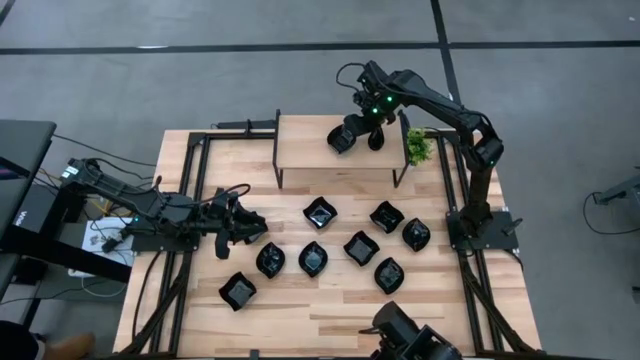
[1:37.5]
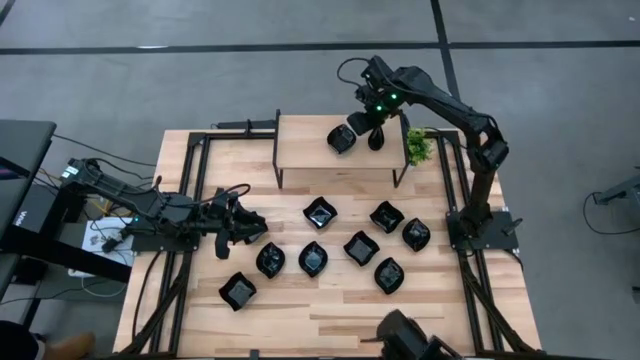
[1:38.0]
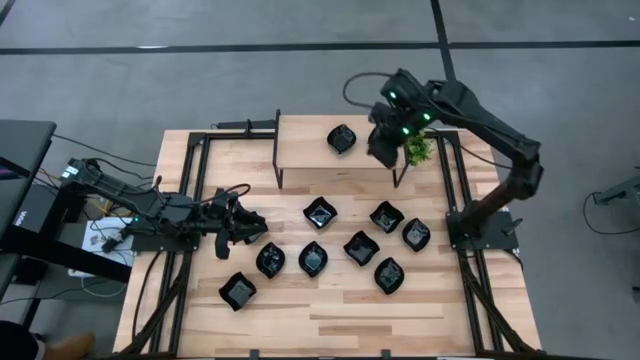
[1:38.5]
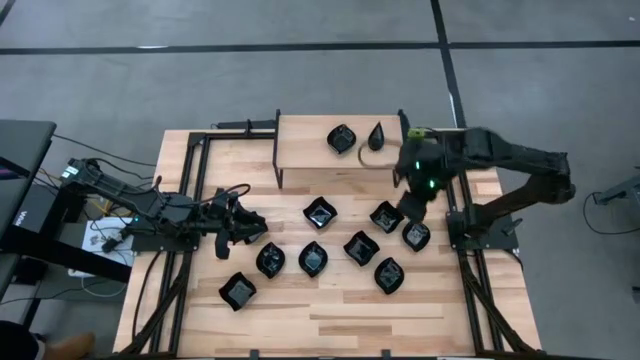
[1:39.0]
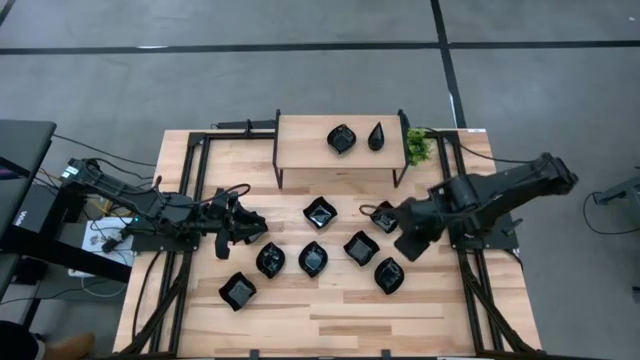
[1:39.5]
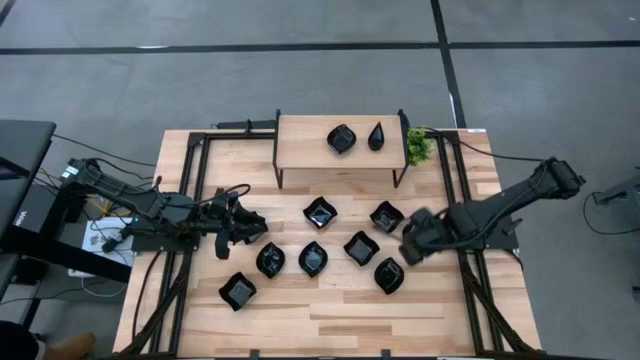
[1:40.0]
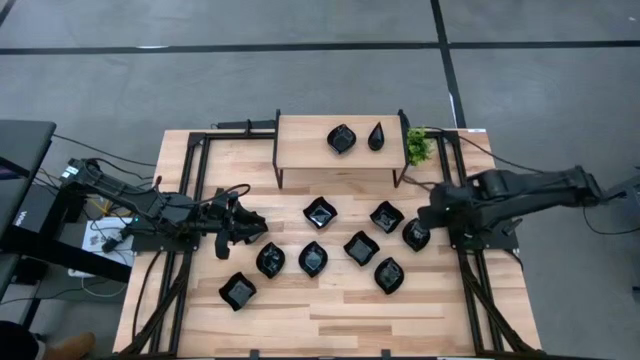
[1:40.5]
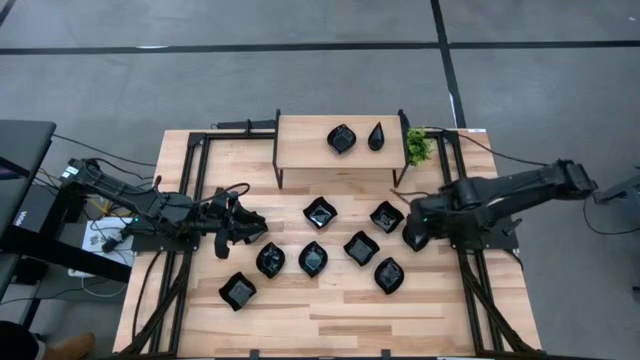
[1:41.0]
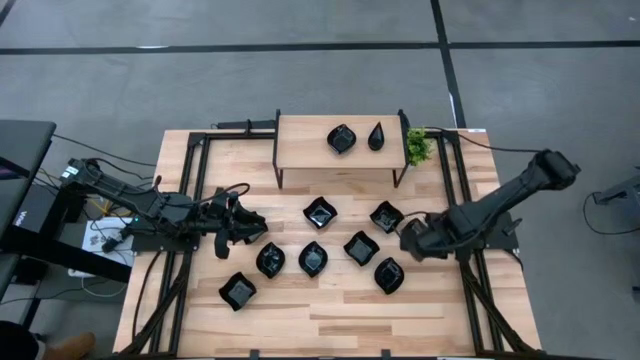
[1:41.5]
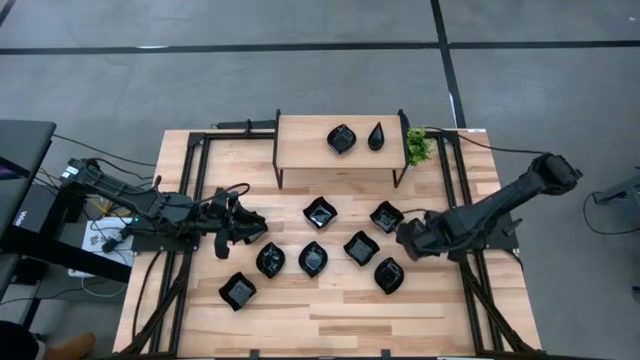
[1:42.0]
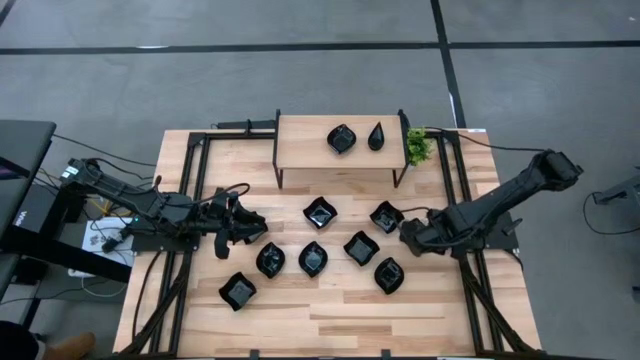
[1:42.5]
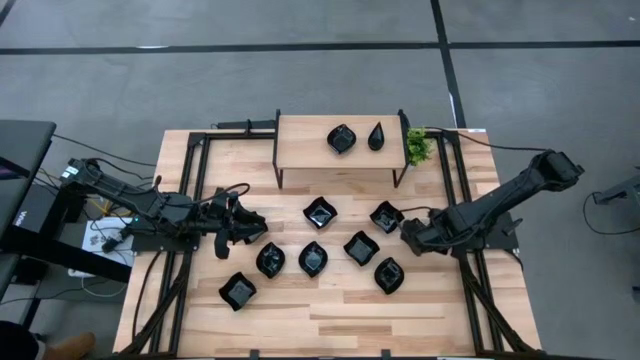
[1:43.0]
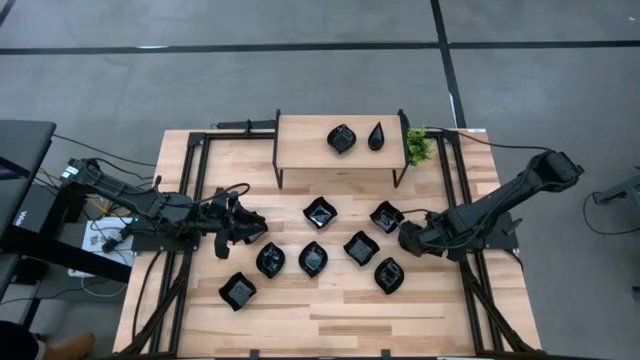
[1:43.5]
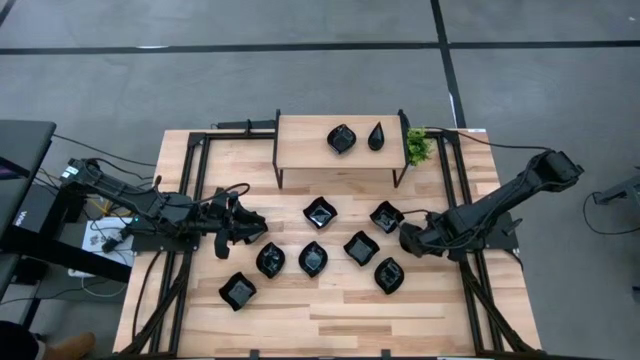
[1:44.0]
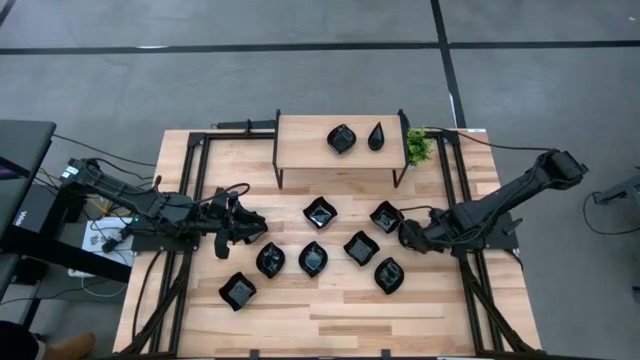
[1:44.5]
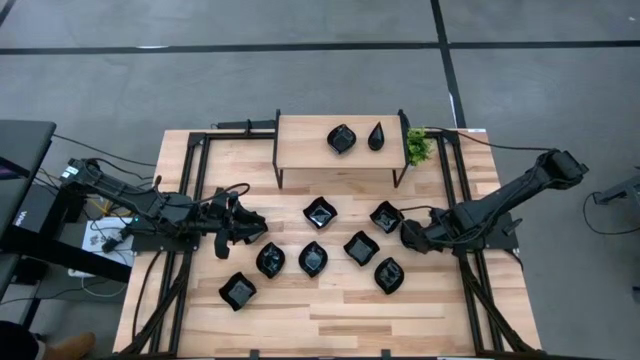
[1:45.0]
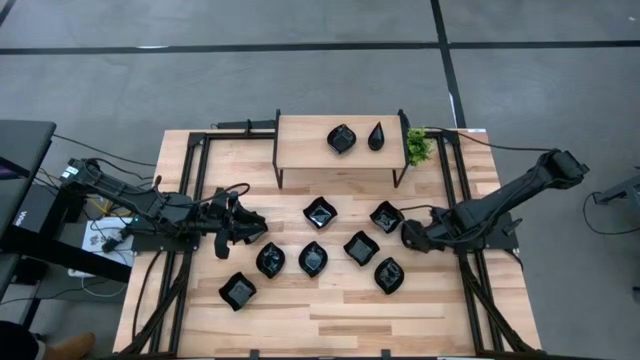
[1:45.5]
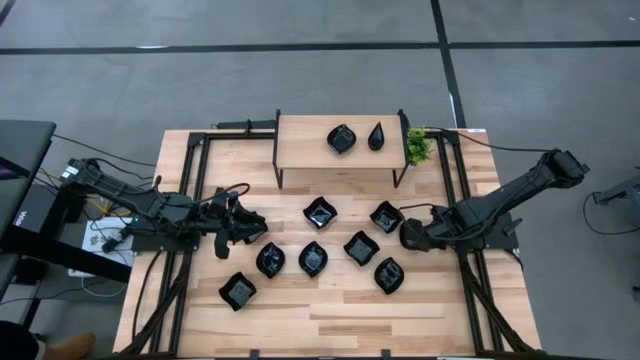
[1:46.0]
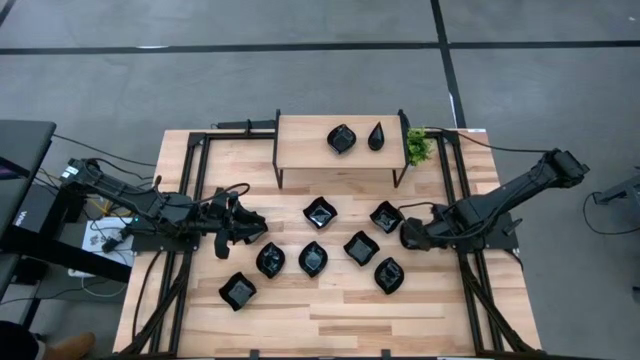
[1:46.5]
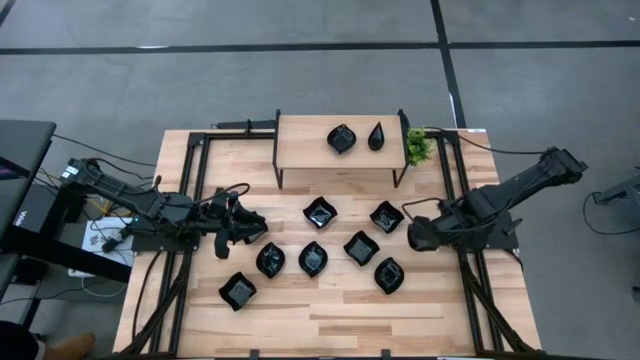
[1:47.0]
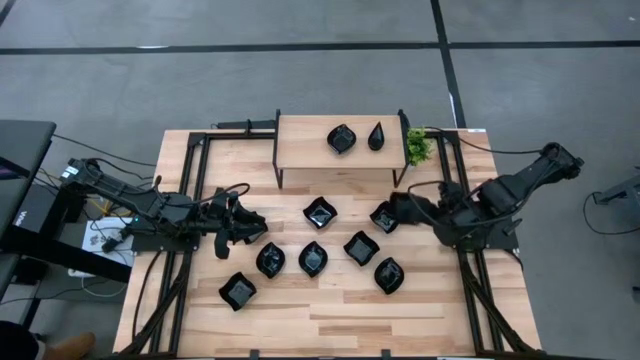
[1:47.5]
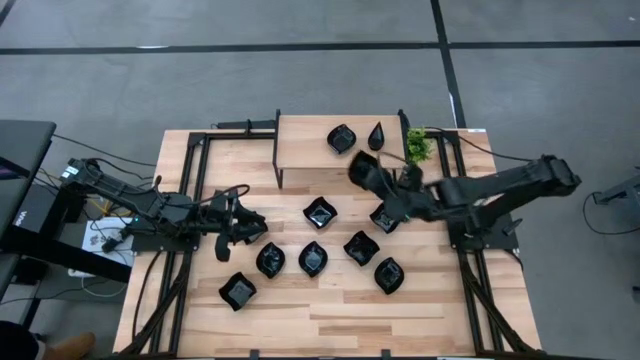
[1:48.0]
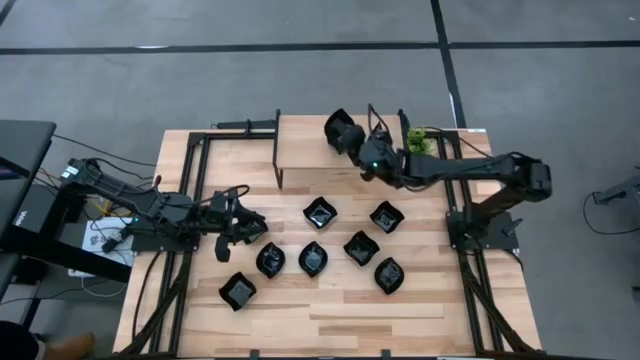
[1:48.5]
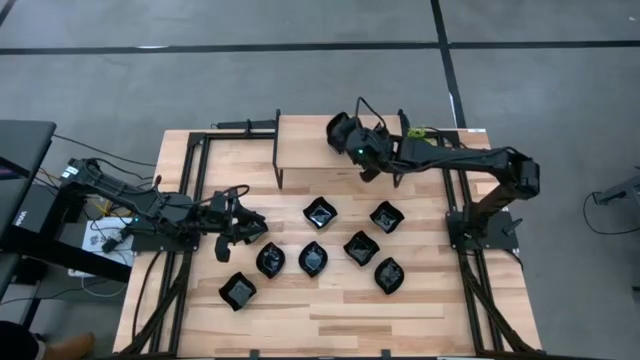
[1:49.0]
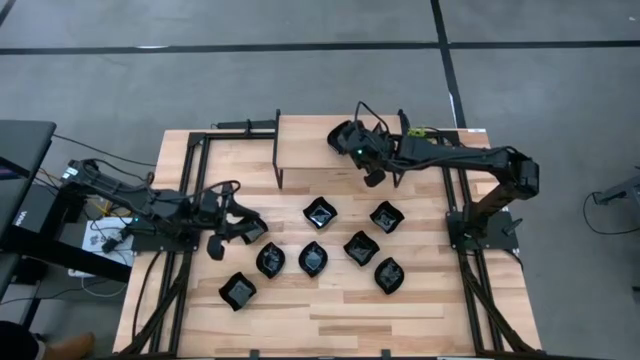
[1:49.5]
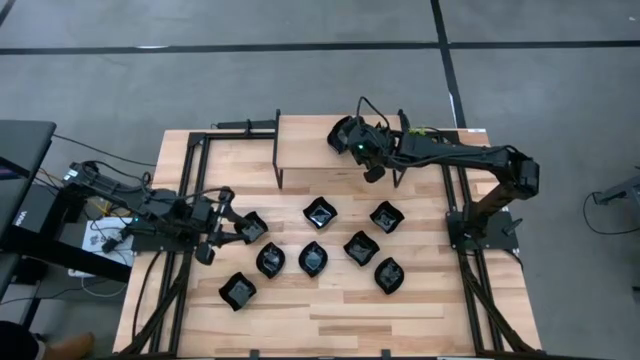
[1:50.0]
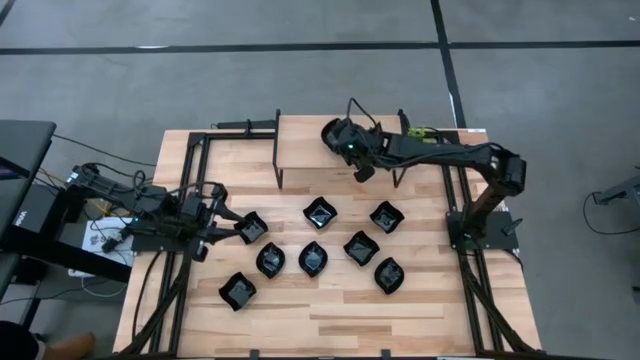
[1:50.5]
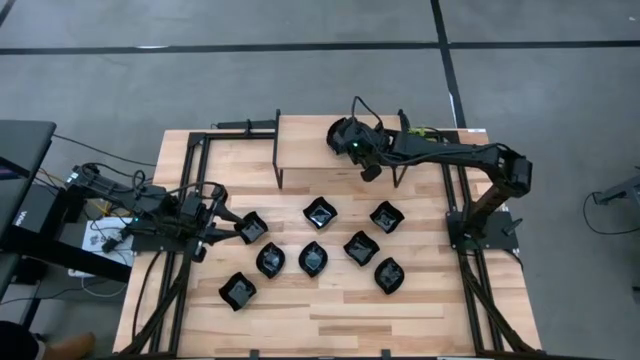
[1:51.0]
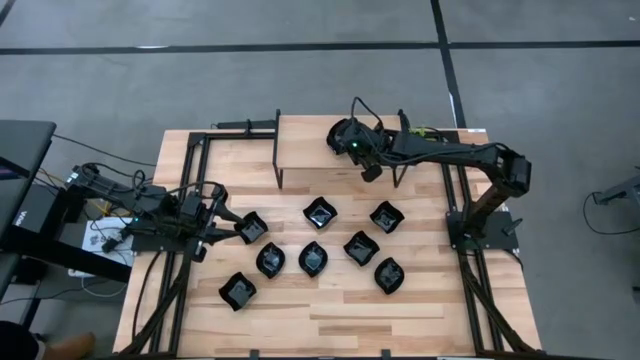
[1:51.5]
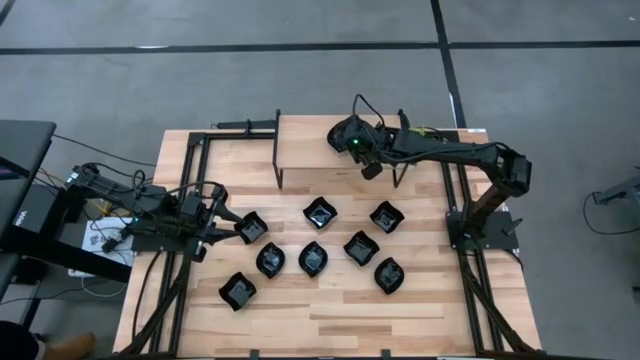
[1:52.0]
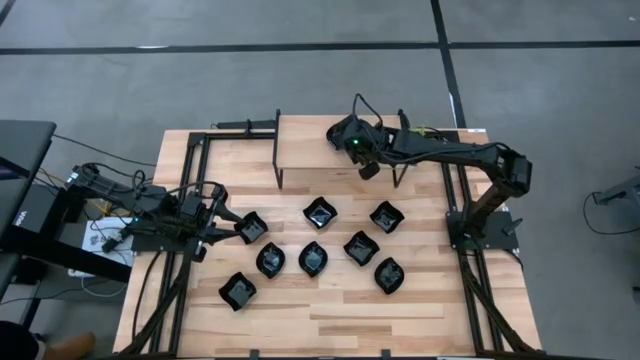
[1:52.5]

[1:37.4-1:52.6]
Task: Pick & Place Mini shaped plates
Stack the leaf-shaped plate on top of the other leaf-shaped plate on the shelf

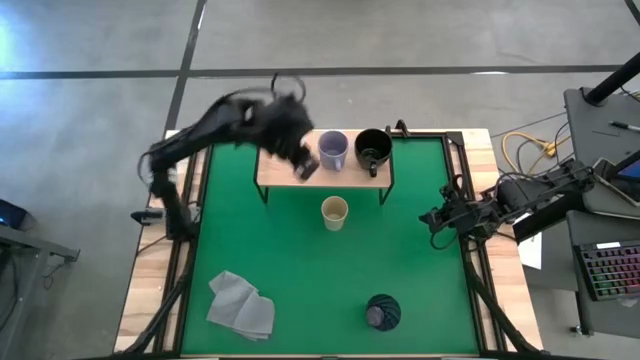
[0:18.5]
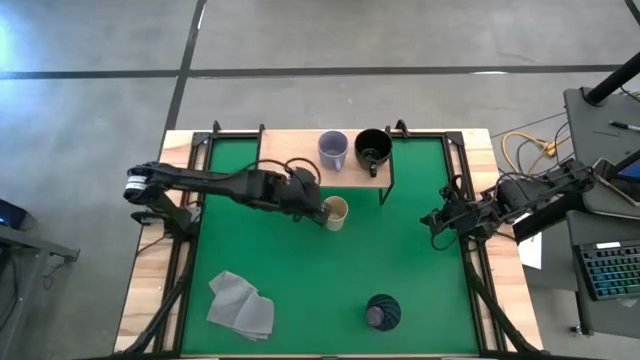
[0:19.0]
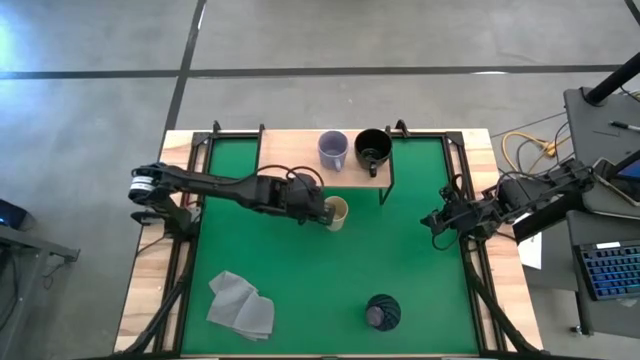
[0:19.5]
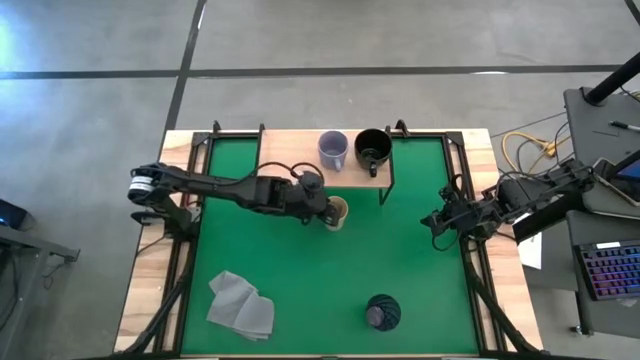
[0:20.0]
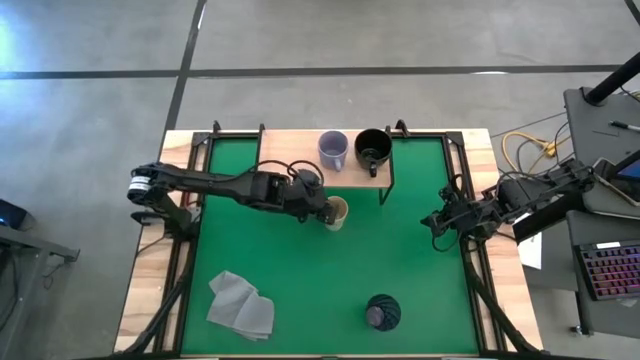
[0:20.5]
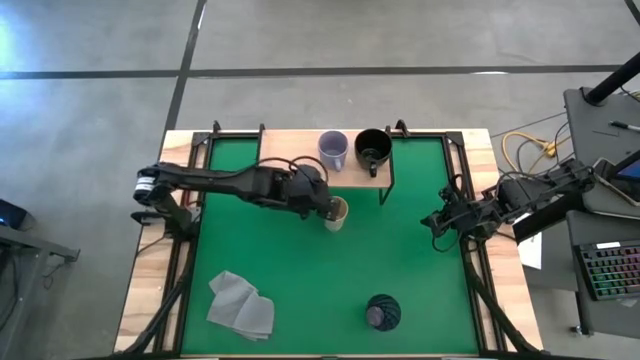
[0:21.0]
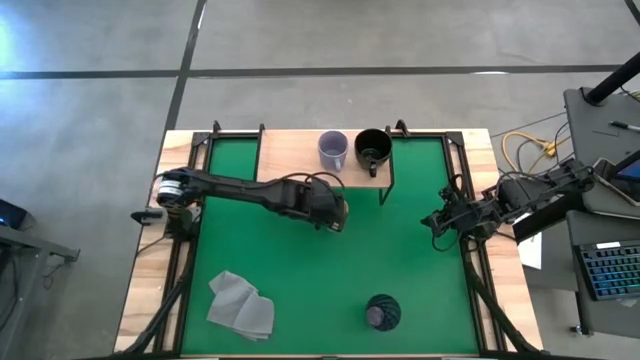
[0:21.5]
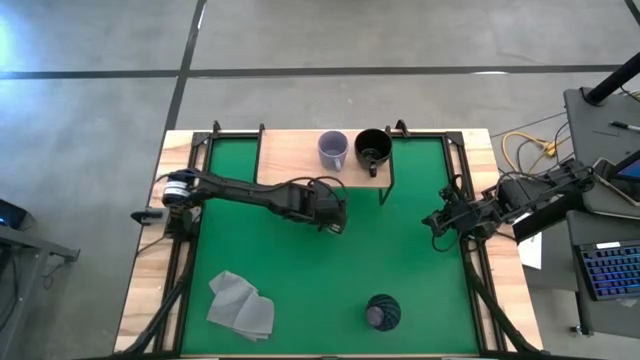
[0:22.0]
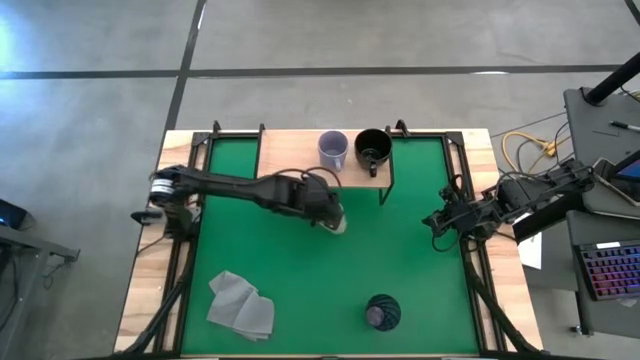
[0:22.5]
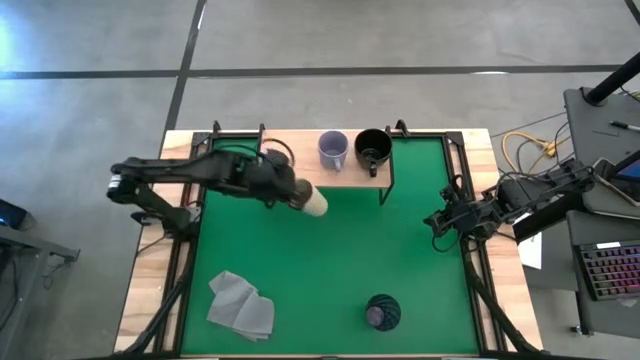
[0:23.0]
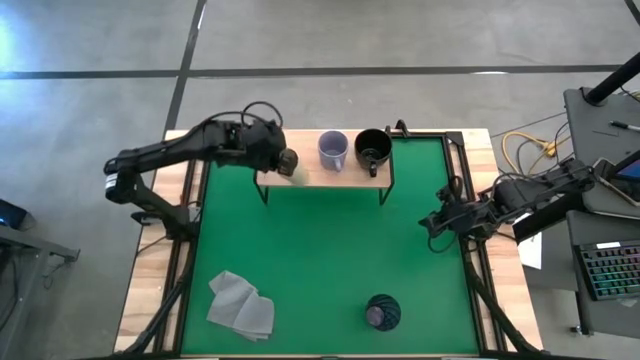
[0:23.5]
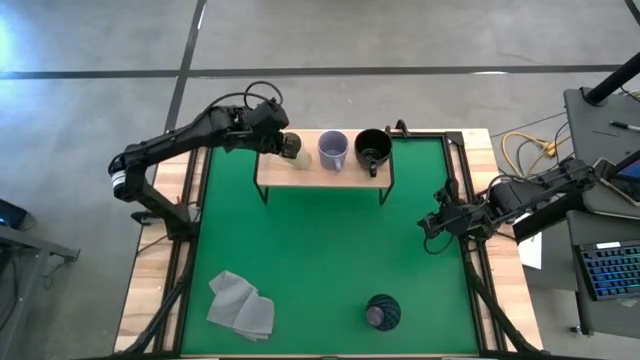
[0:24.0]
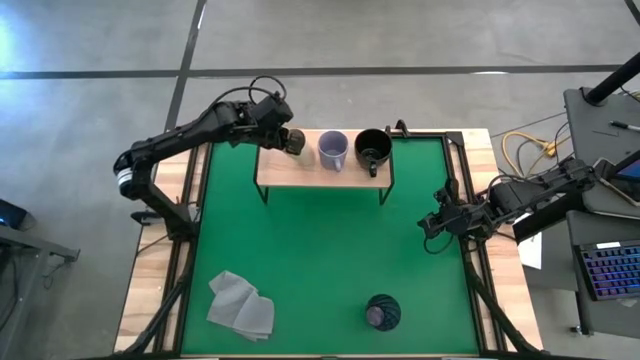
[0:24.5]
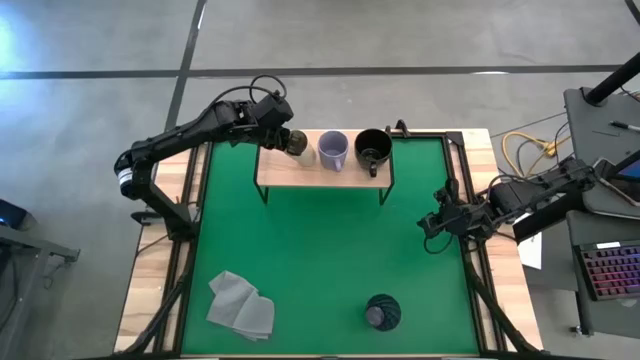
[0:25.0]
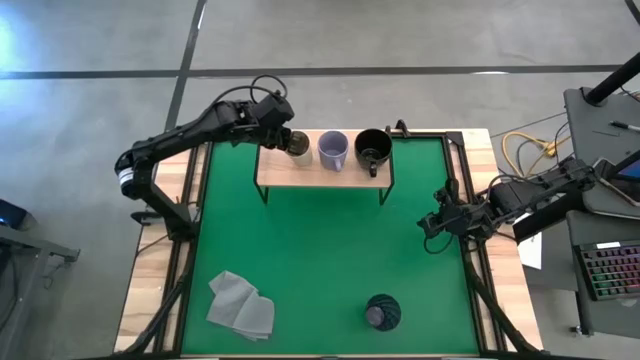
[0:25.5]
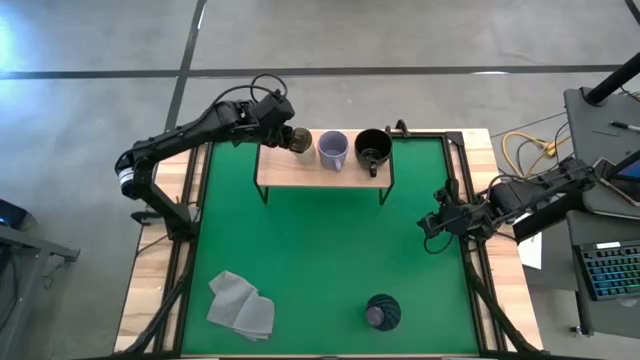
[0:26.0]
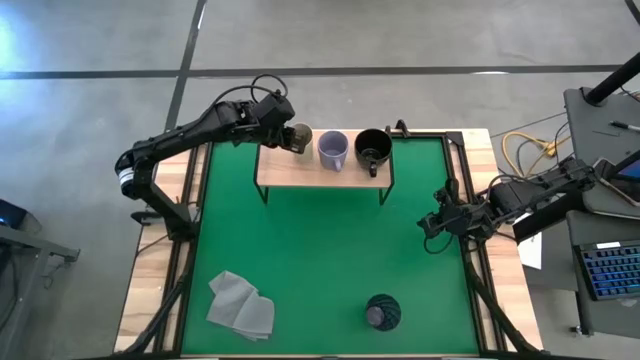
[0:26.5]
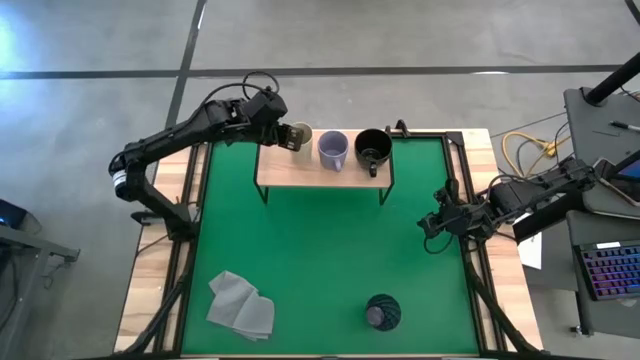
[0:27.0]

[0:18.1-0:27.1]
Task: Stack small to large cups/mugs on shelf
Put the white cup on the shelf
